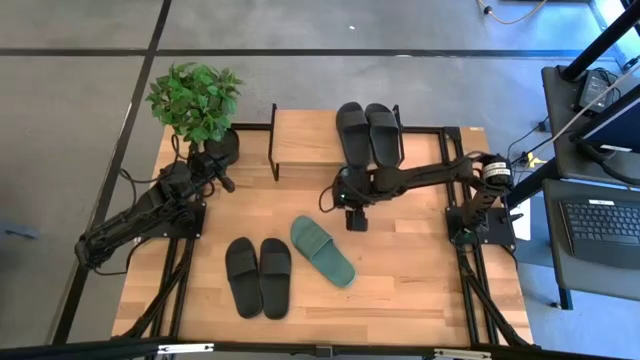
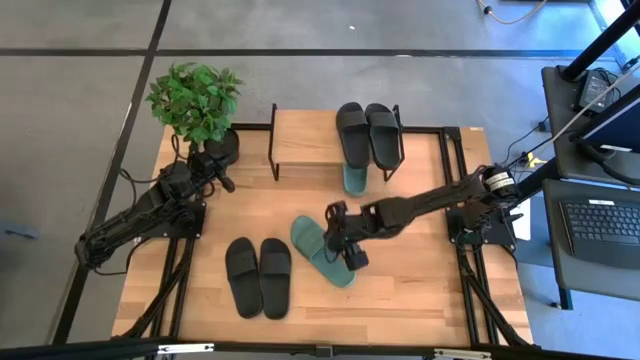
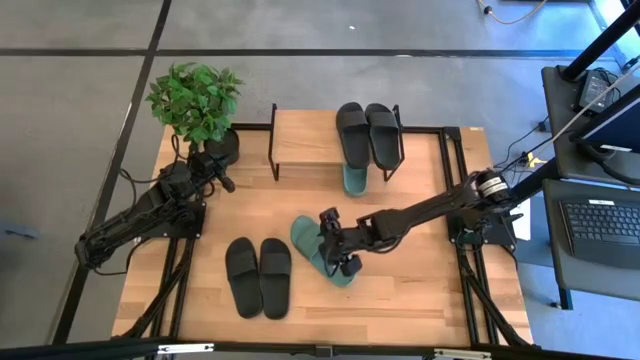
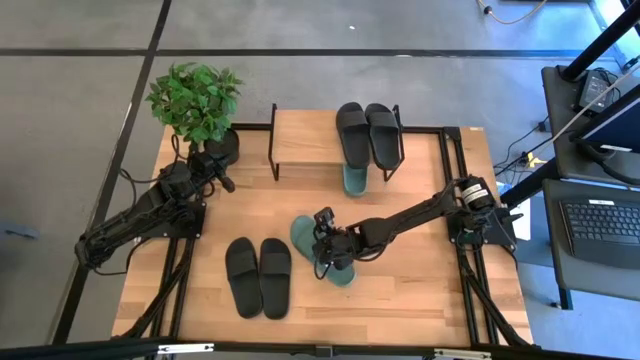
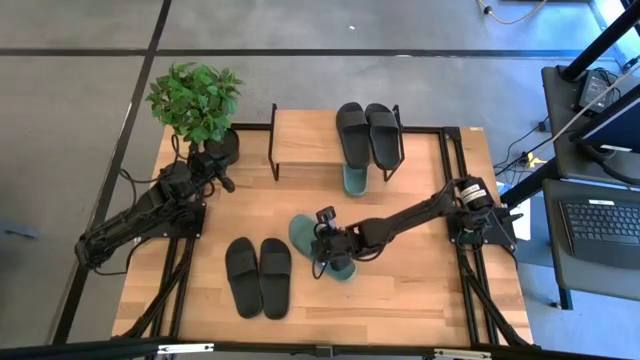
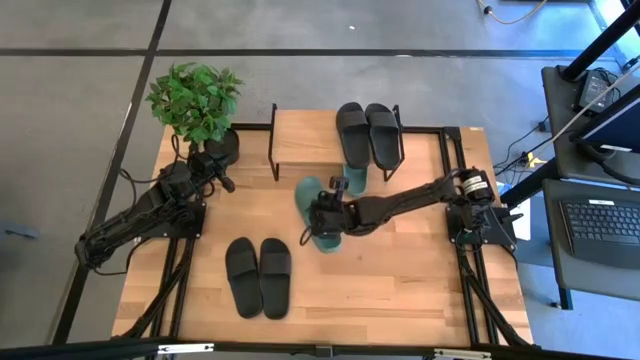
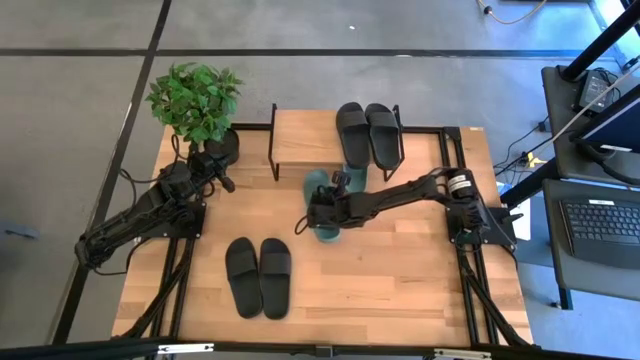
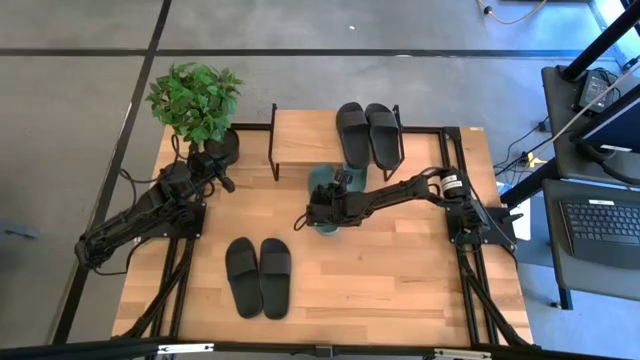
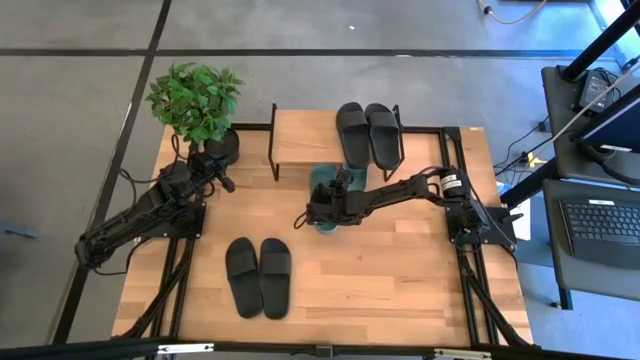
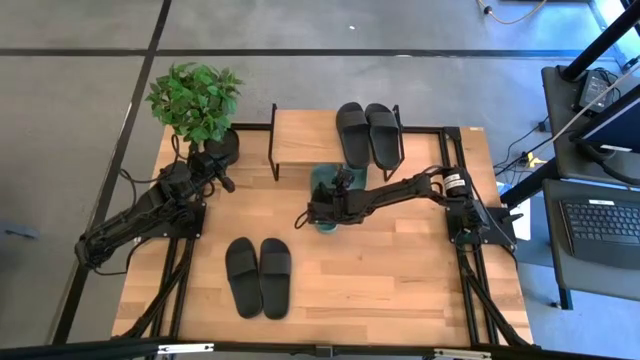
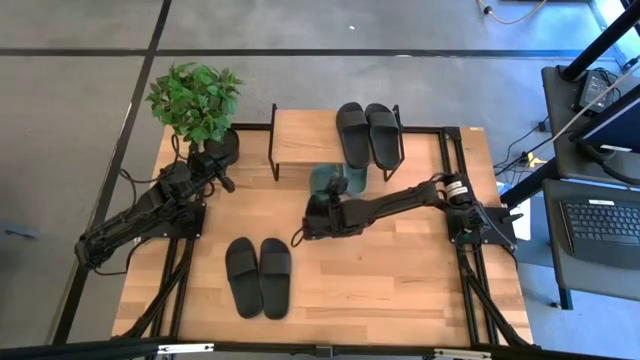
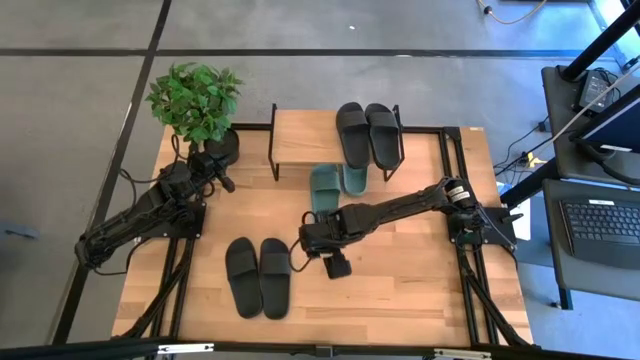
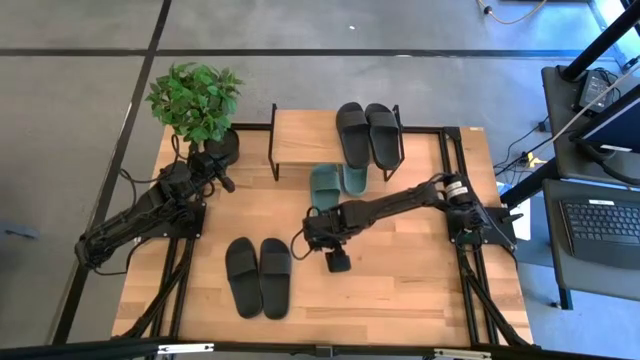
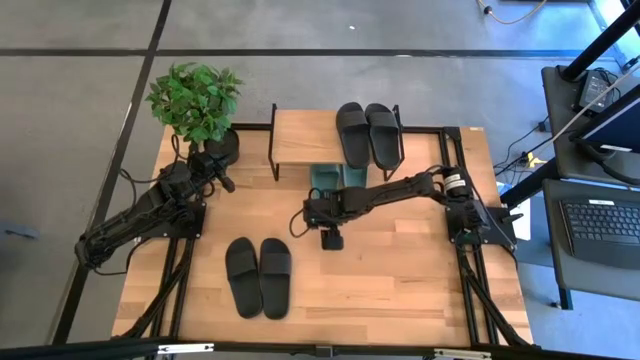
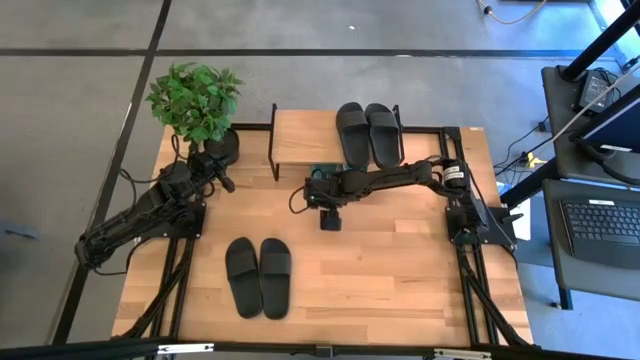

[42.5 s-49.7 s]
Task: Pick and place slides into the shelf
Put the green slide under the shelf

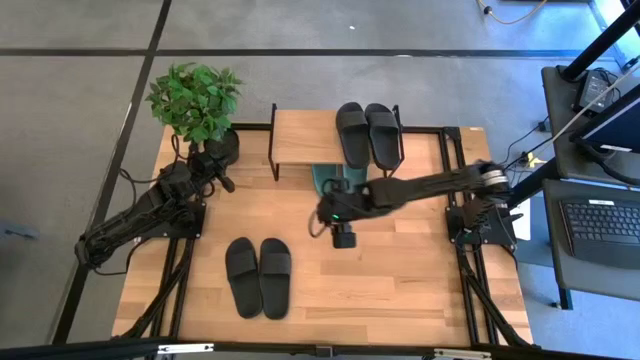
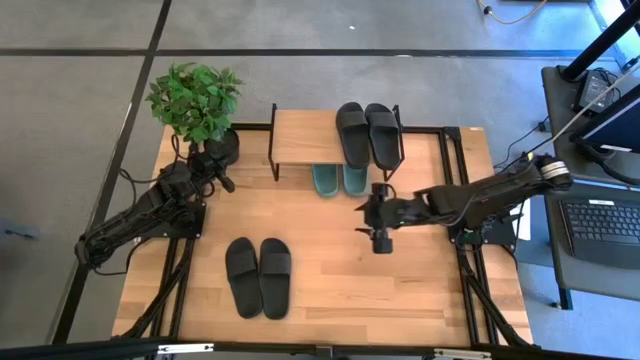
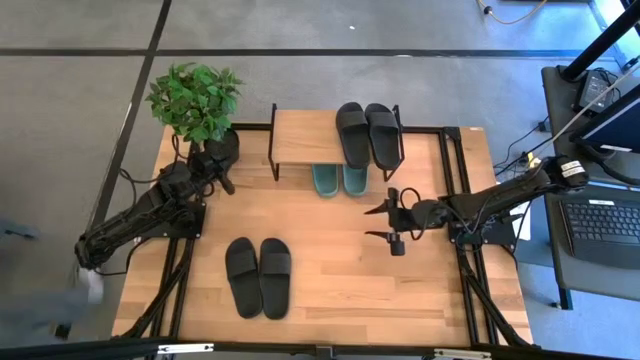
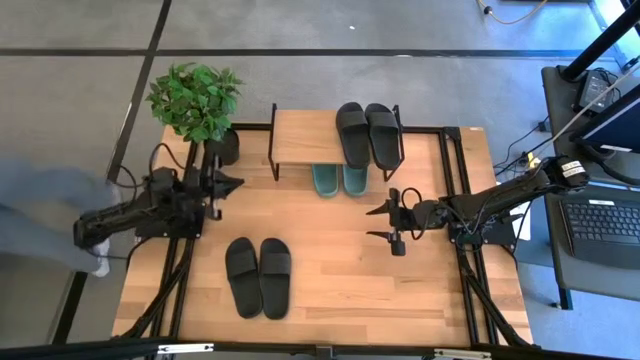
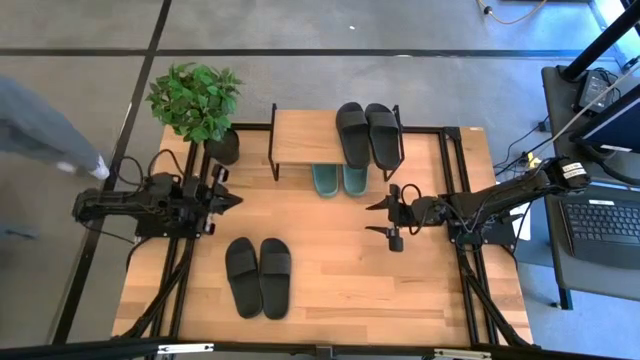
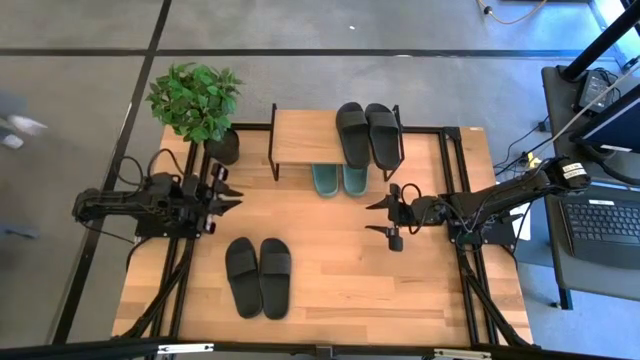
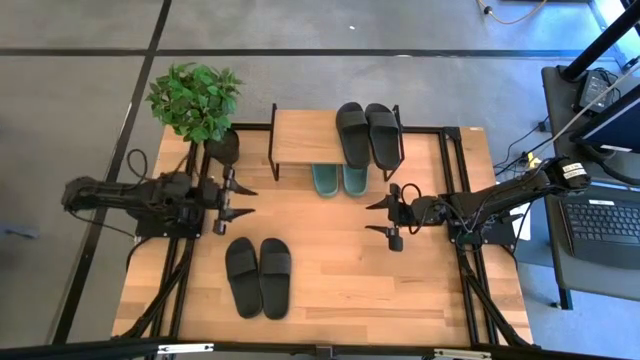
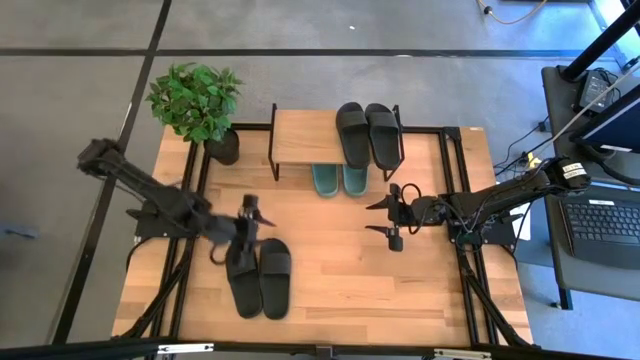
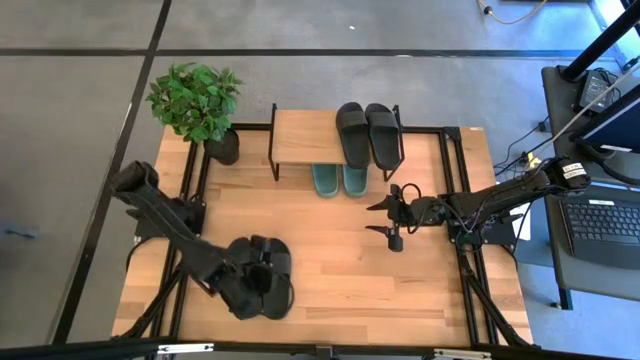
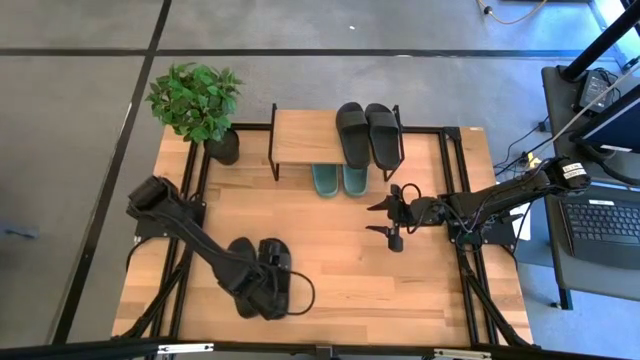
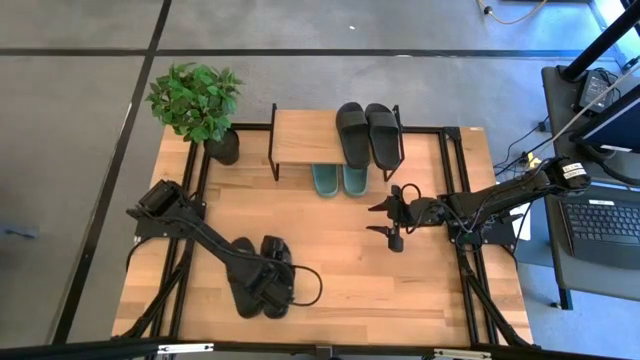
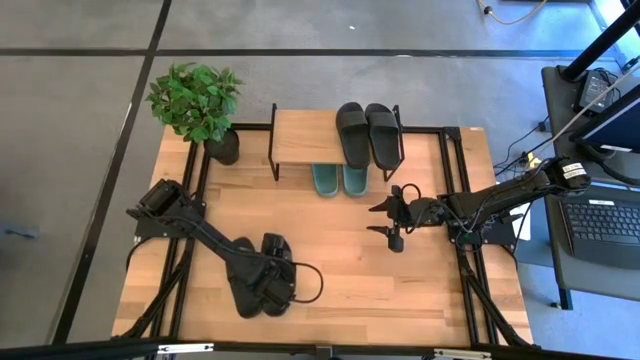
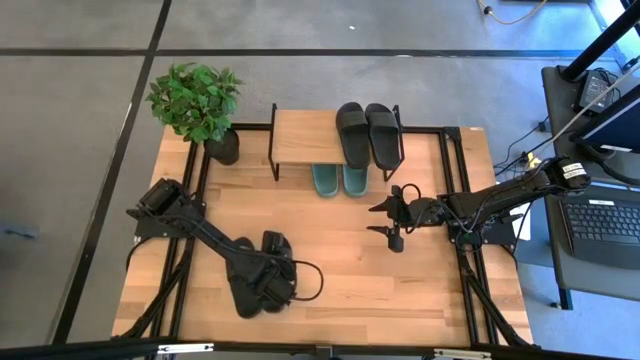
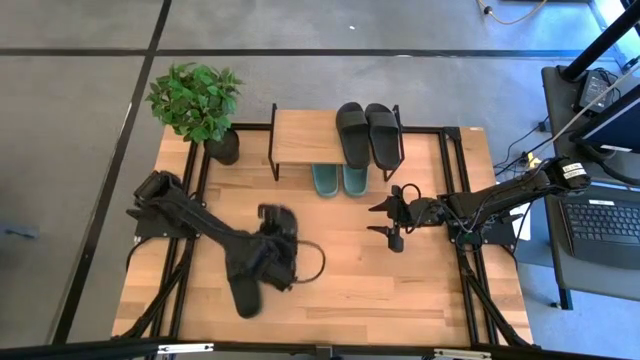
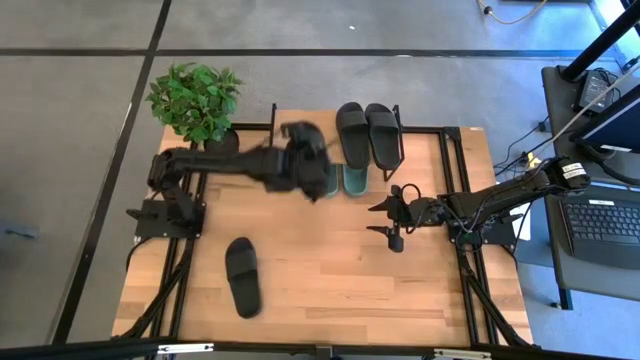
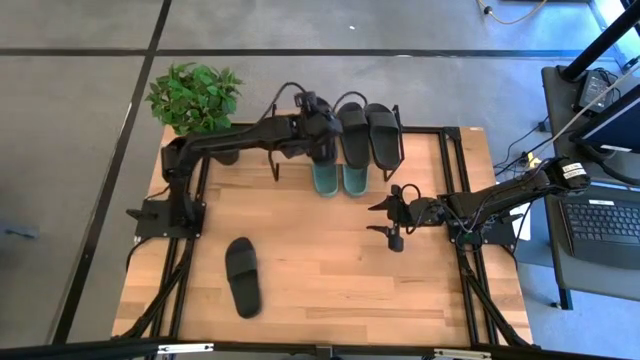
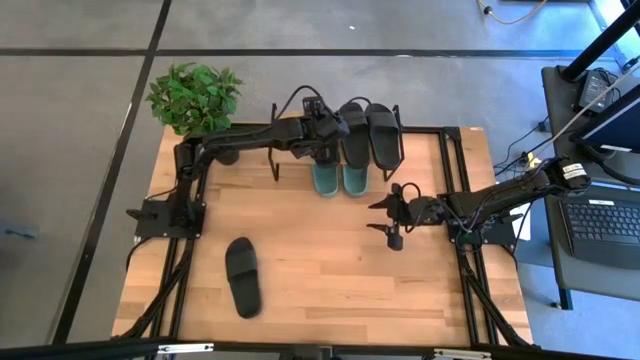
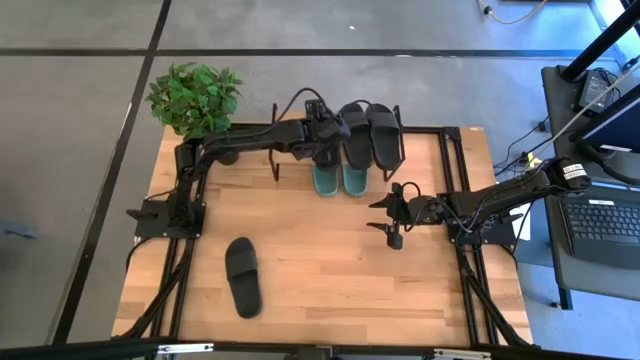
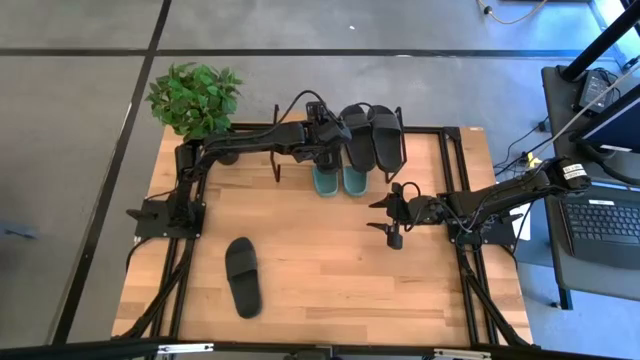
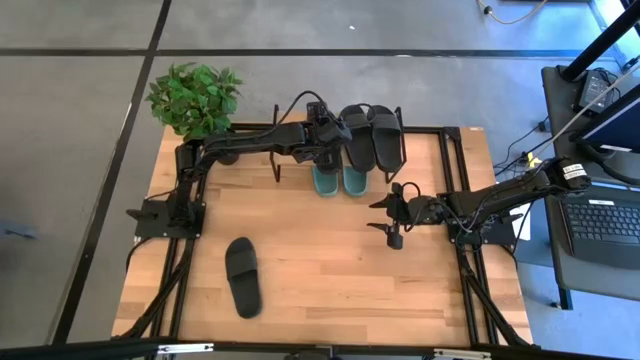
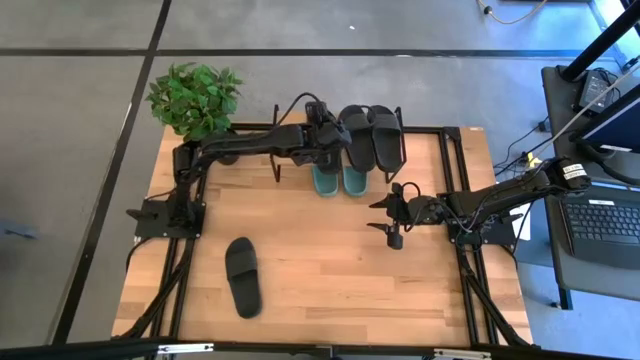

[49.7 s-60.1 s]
Put the black slide on the shelf

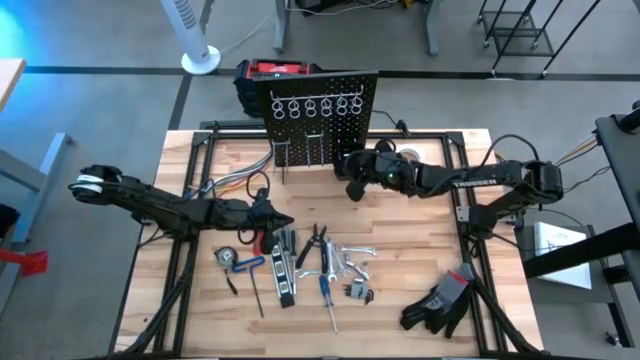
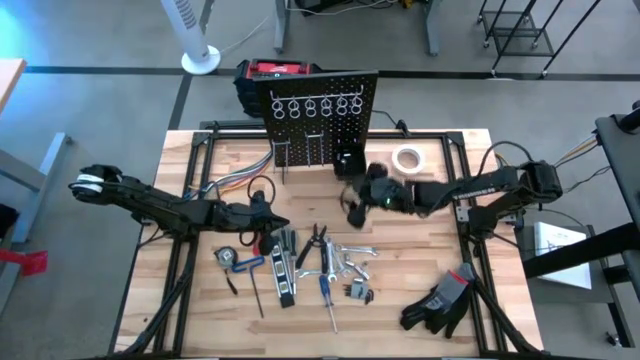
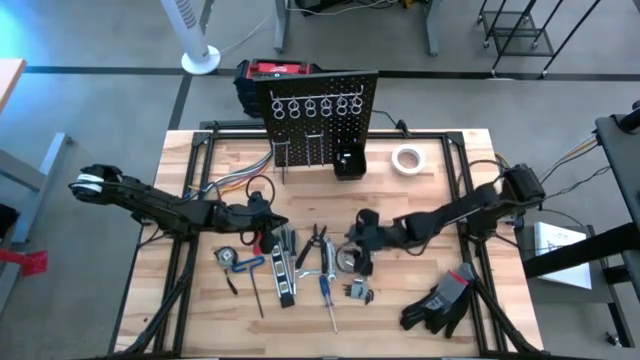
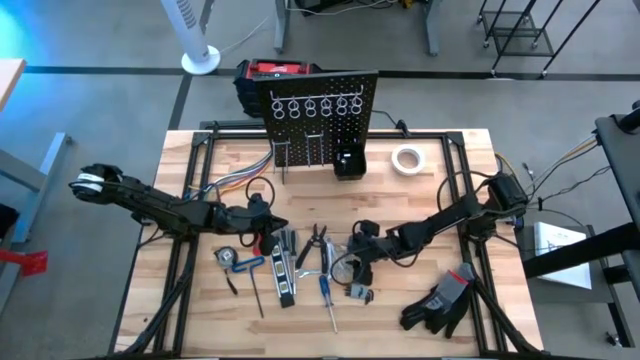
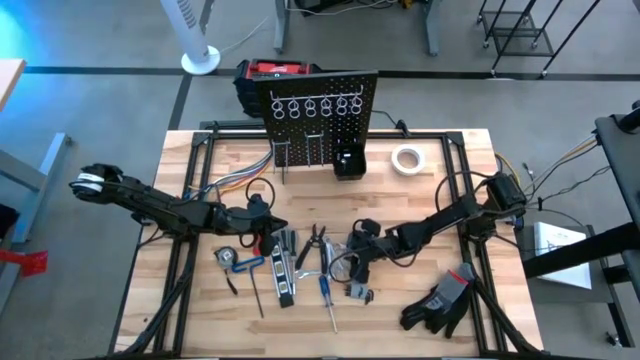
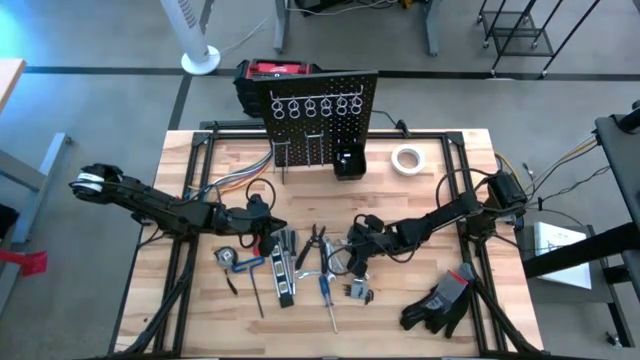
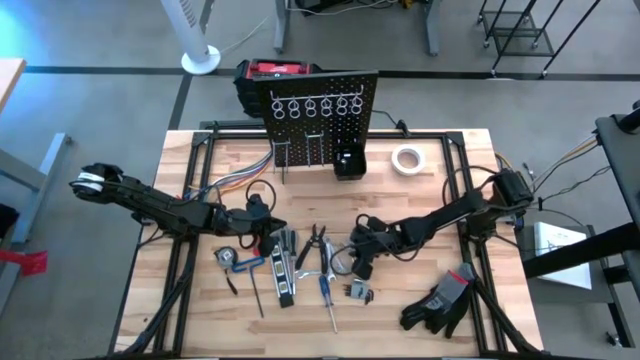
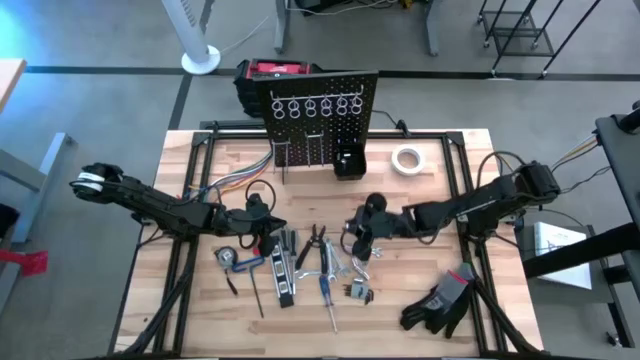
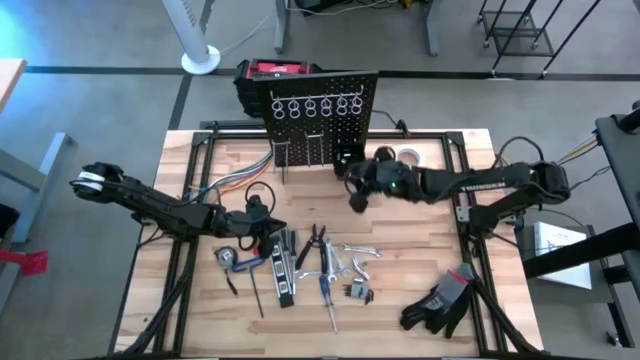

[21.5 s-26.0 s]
Task: Hang tools onto peg board
Put the socket into the black tool bin on the peg board
